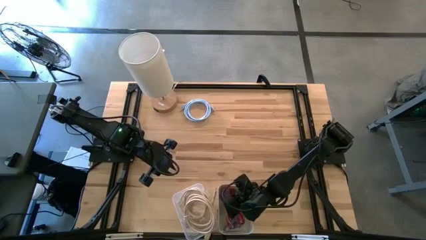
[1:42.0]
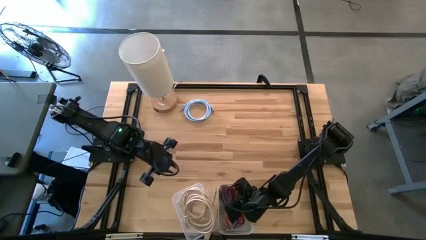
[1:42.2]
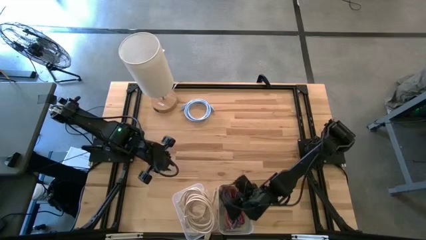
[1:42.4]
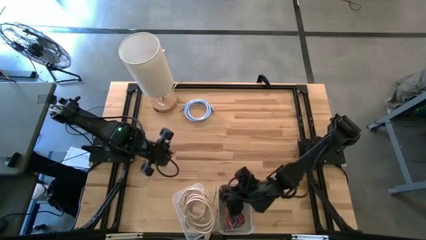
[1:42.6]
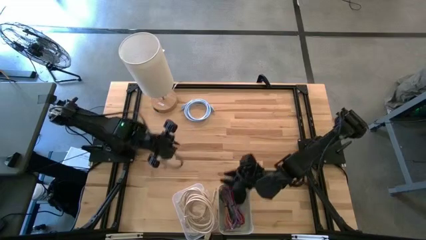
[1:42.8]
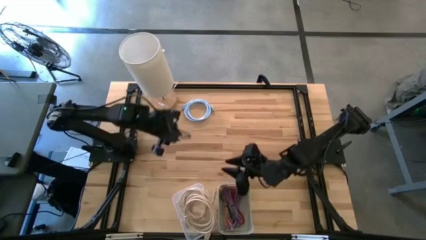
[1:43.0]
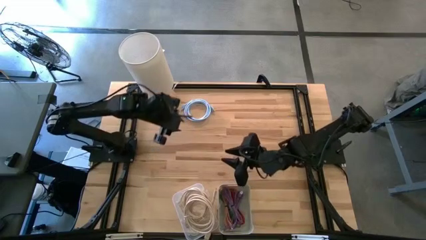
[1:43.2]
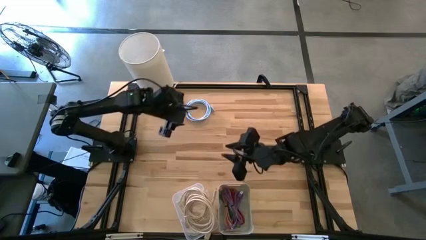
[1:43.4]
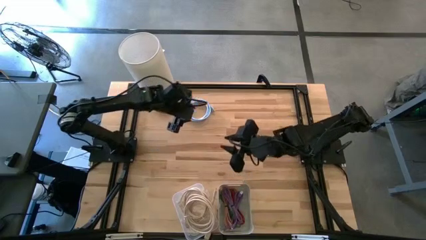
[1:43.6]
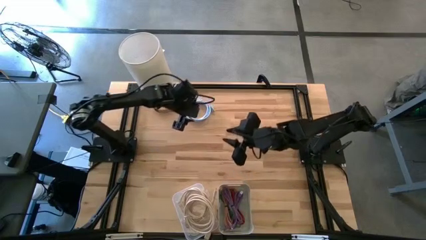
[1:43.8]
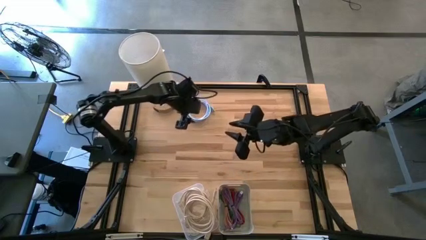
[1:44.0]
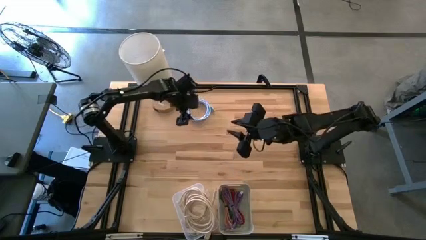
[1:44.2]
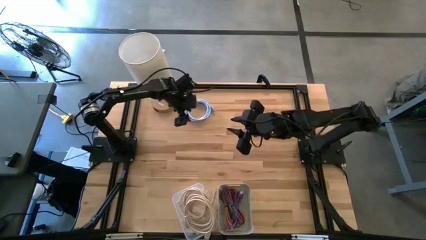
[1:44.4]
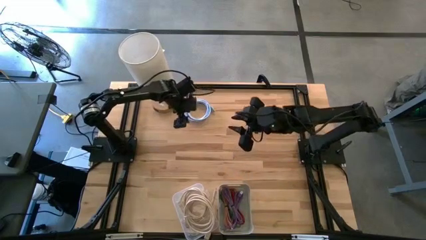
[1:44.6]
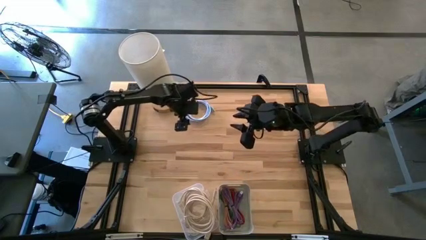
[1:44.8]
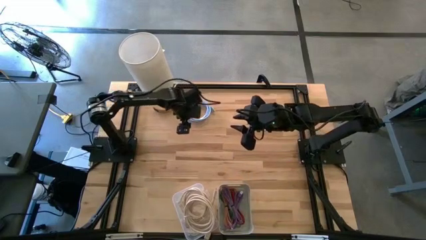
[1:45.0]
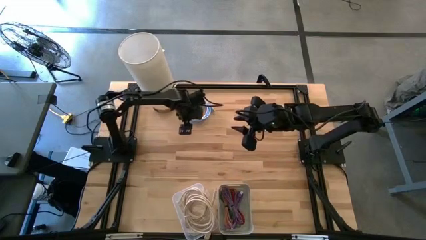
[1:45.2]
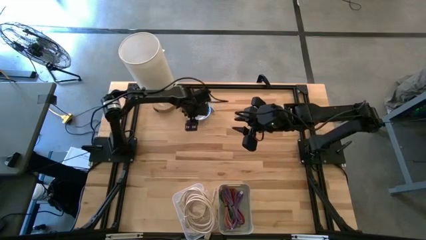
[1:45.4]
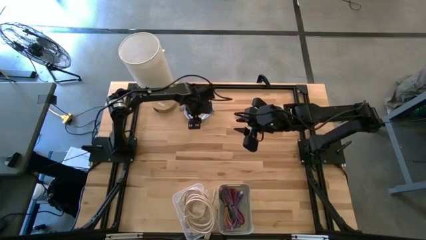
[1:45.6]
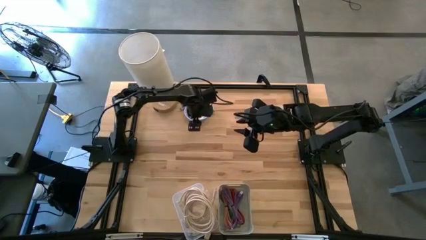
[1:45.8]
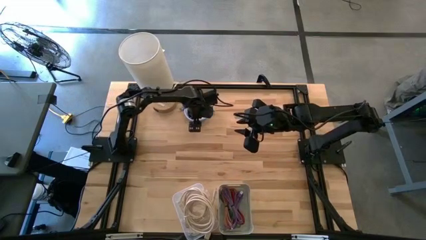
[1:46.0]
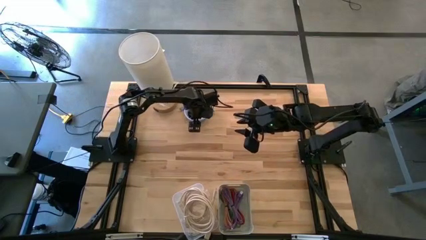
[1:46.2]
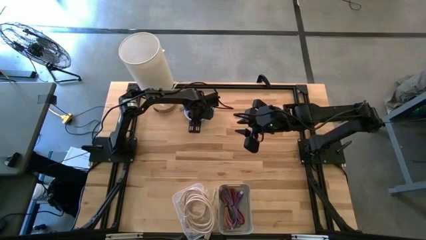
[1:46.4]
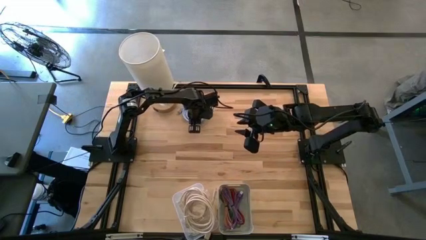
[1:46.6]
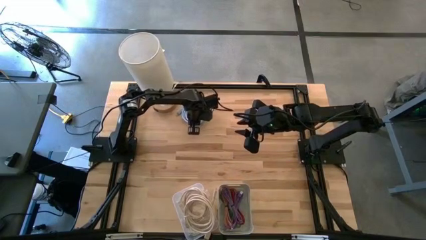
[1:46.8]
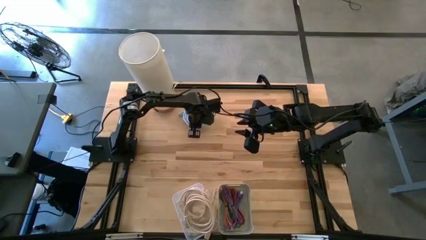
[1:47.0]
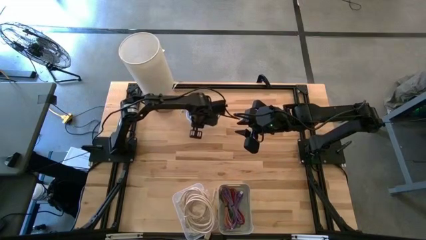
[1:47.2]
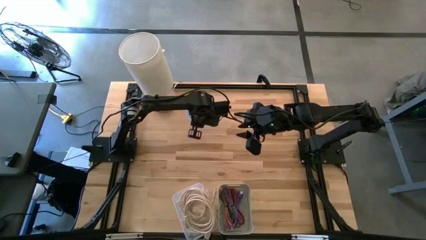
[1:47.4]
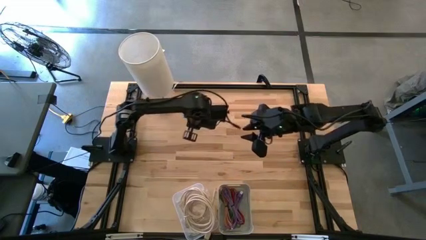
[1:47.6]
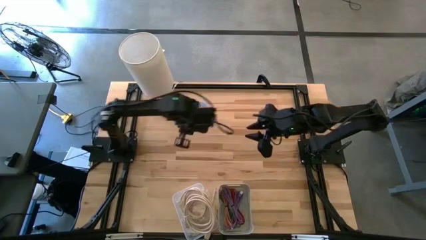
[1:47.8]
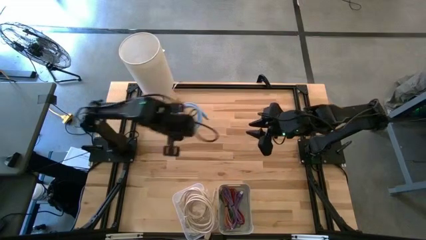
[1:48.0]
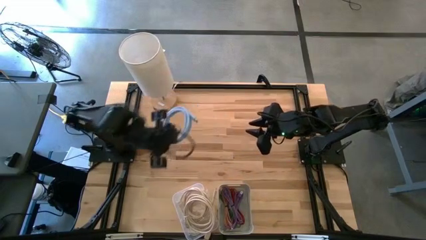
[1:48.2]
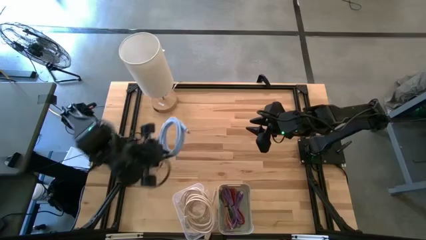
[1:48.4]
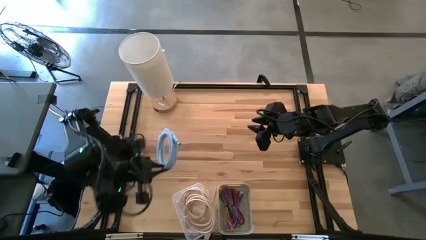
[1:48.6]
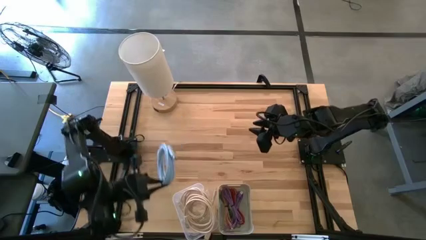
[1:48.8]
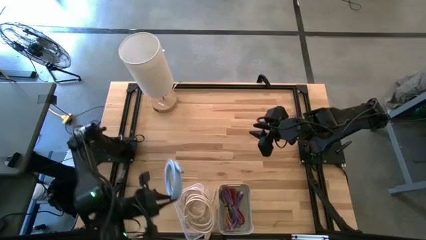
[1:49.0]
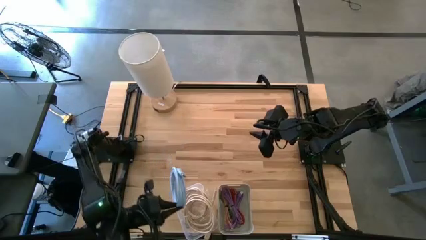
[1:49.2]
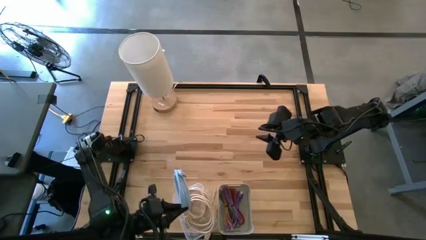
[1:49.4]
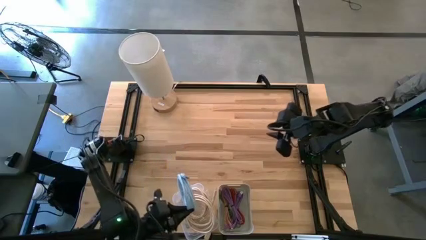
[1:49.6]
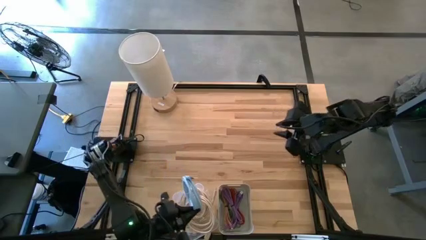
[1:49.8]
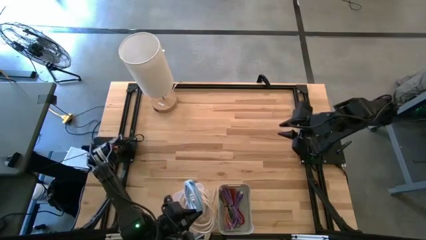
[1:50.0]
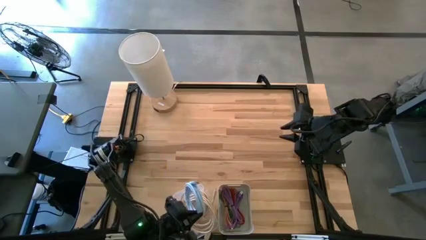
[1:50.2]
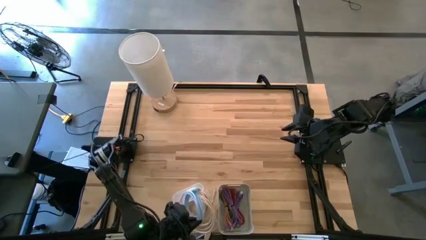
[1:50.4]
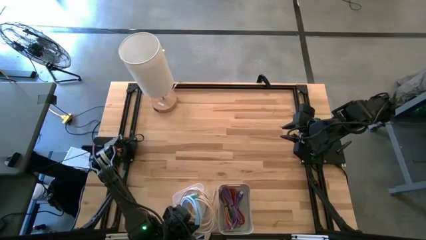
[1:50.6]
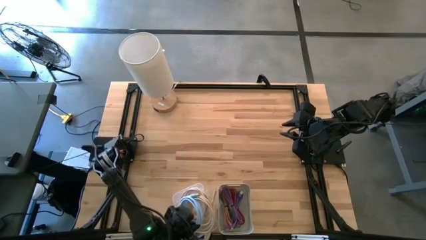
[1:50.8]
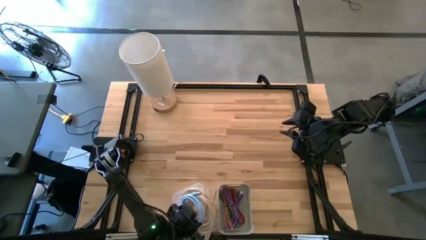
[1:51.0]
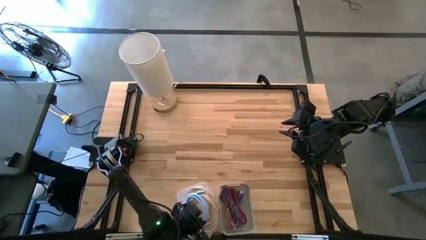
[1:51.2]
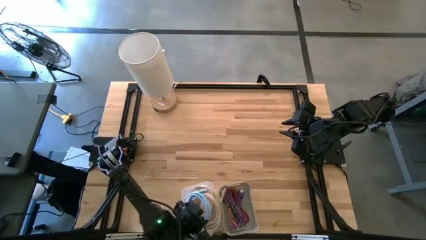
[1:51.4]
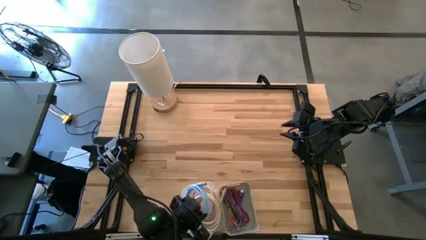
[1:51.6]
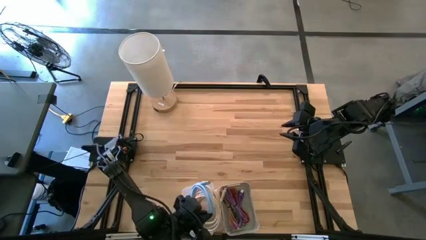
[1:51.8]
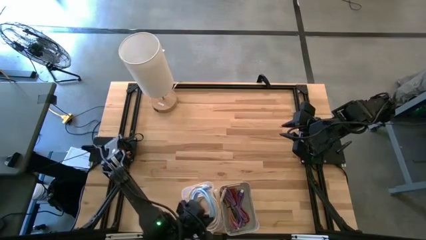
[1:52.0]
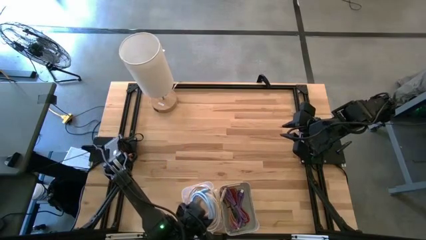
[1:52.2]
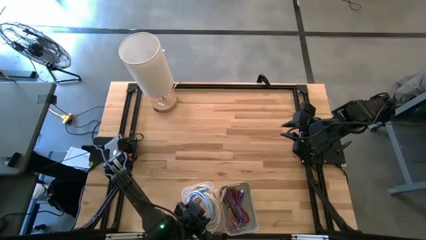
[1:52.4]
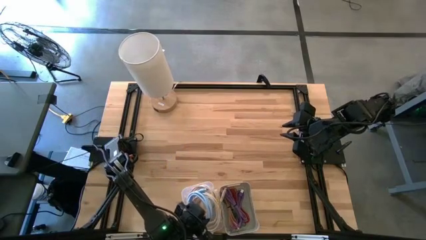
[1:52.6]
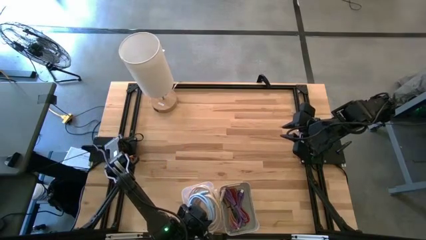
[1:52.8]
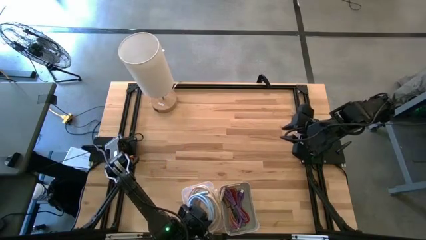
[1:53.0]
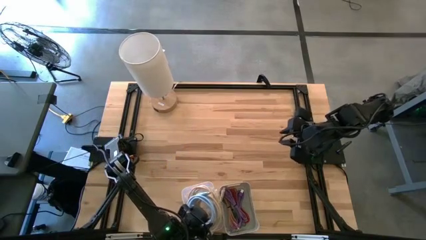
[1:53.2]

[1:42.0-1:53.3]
Task: Pick & Place USB Port
Put the light blue HDMI cable into the transparent bin

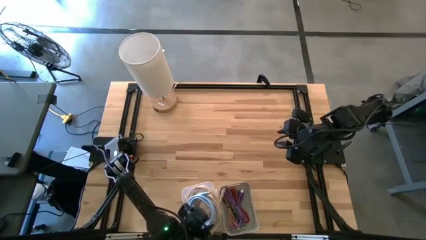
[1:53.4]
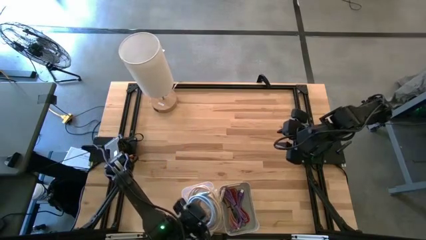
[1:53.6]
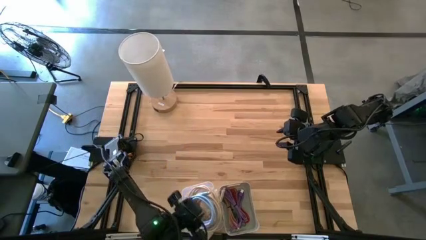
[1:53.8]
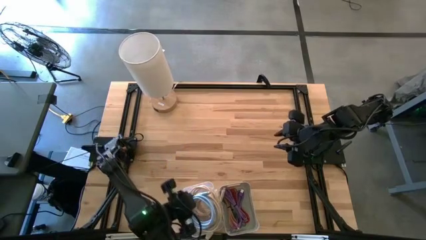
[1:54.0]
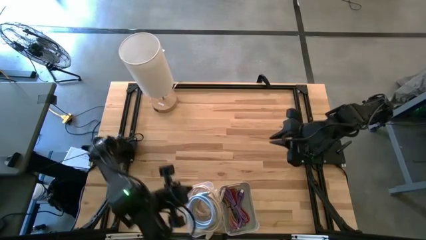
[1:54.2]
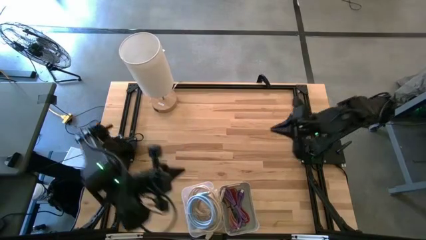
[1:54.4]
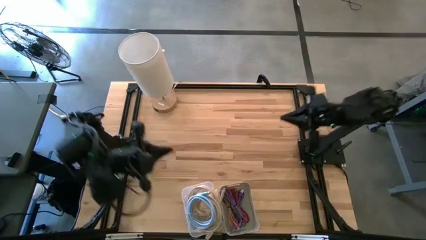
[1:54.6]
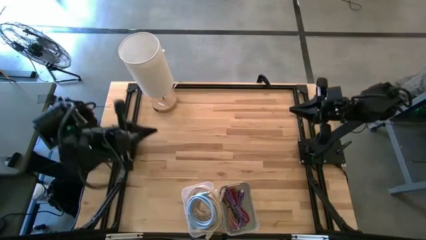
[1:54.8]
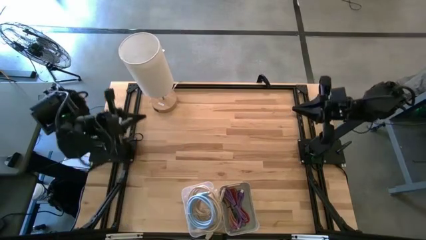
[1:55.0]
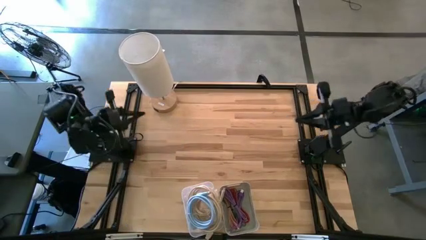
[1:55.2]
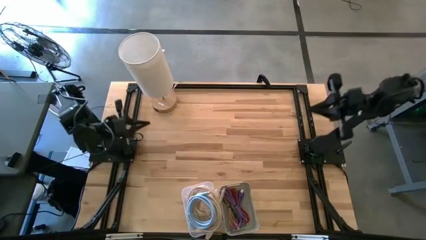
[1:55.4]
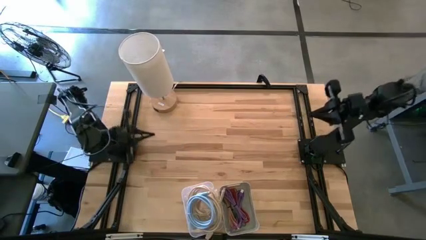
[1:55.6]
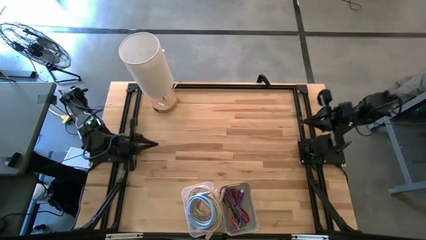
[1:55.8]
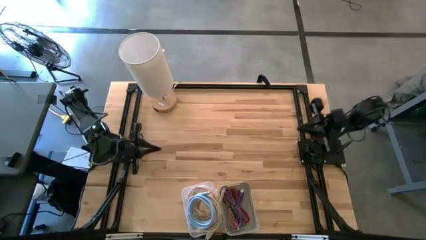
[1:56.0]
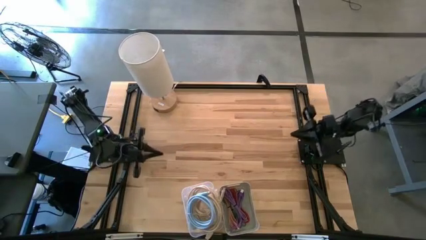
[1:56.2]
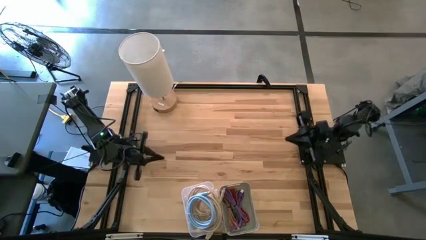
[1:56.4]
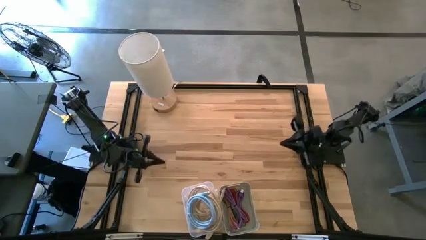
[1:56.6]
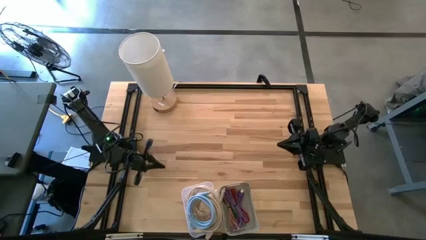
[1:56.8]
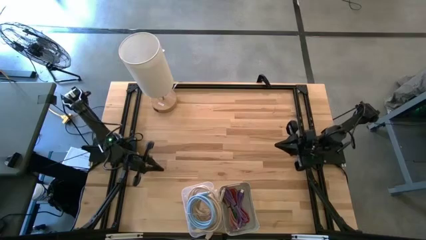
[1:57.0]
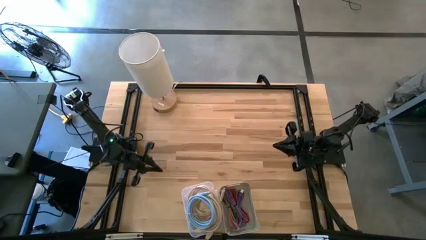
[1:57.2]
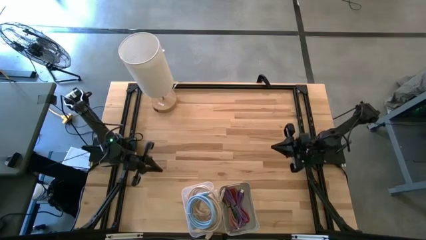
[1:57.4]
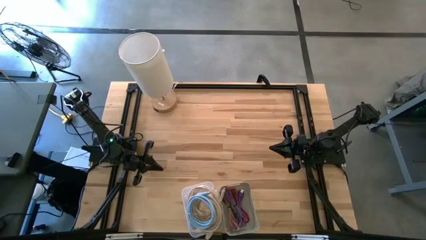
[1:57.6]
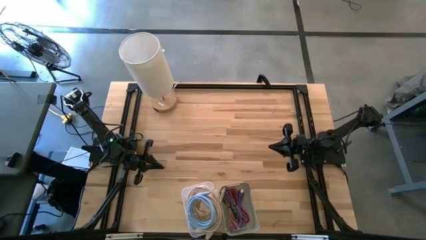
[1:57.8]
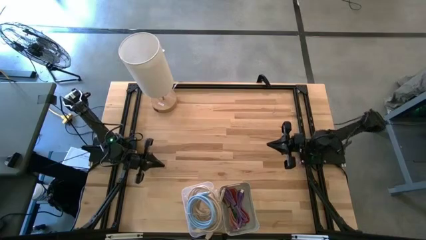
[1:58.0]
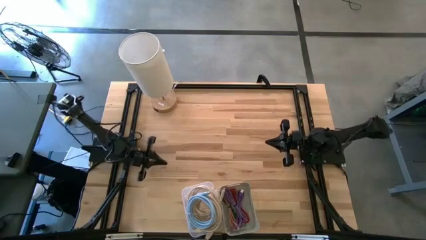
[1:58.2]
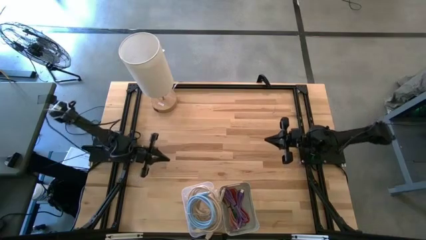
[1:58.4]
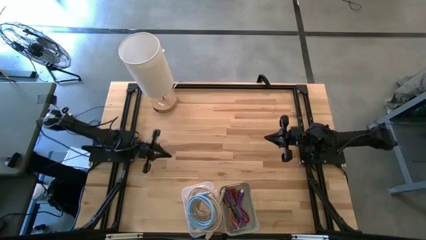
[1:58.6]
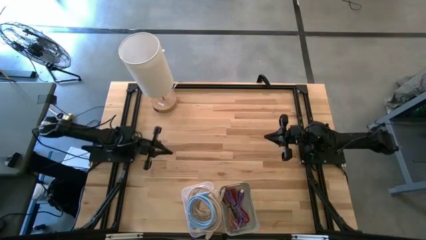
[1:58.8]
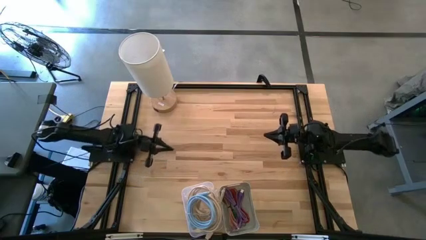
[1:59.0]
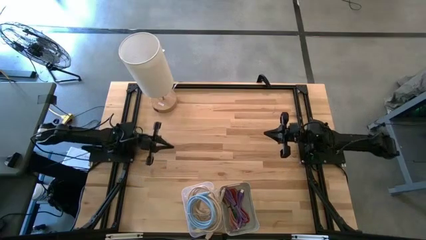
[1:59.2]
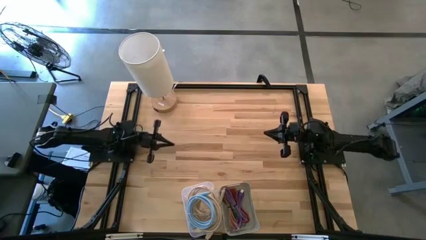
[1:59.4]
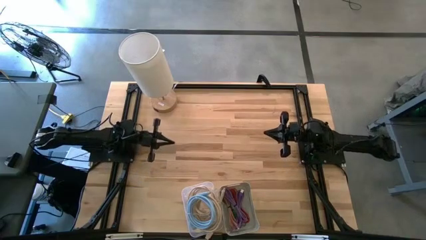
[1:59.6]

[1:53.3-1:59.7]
Return to Home Position
